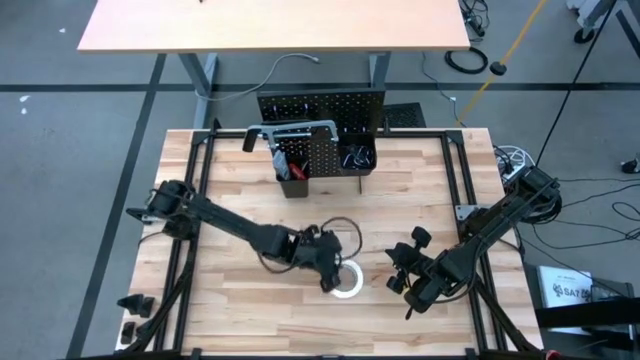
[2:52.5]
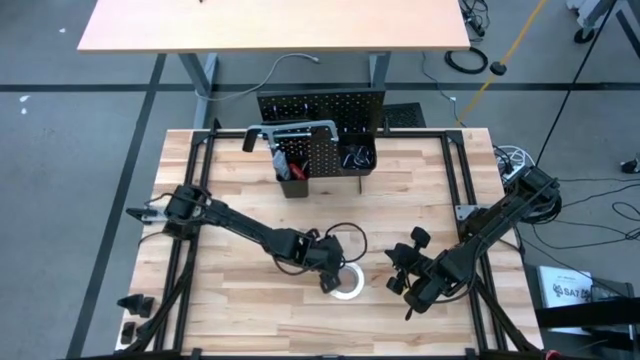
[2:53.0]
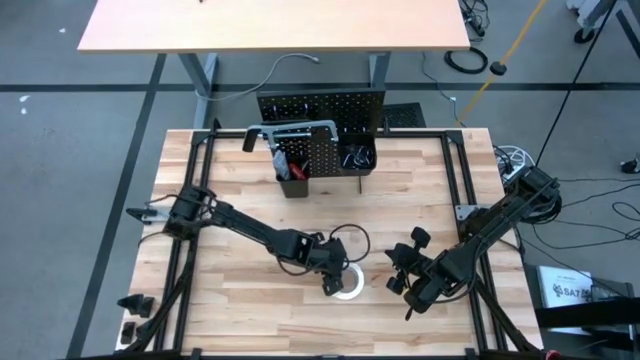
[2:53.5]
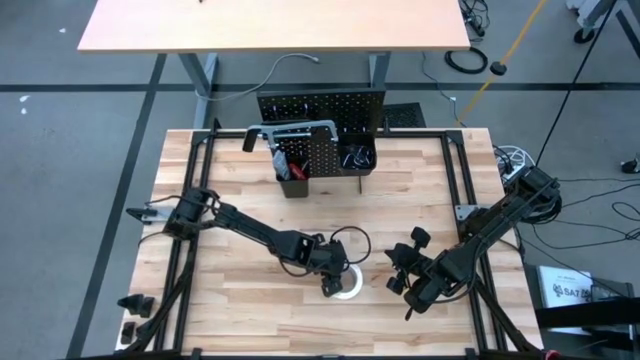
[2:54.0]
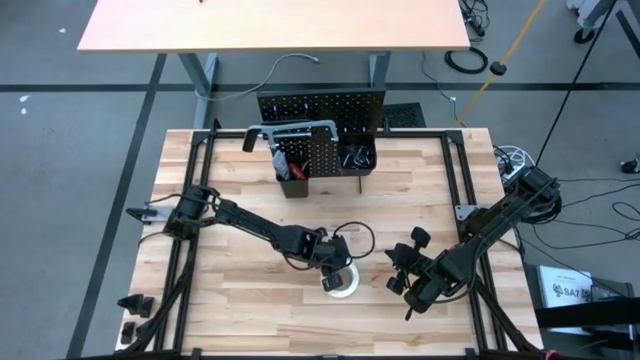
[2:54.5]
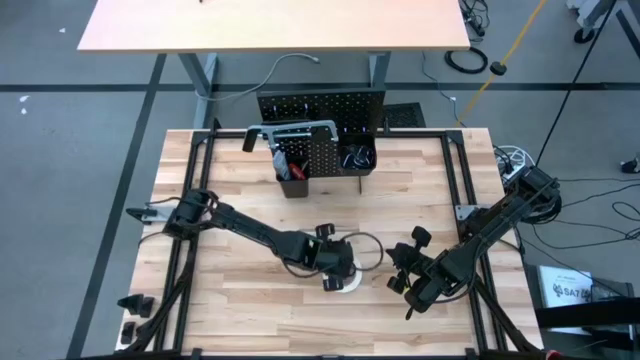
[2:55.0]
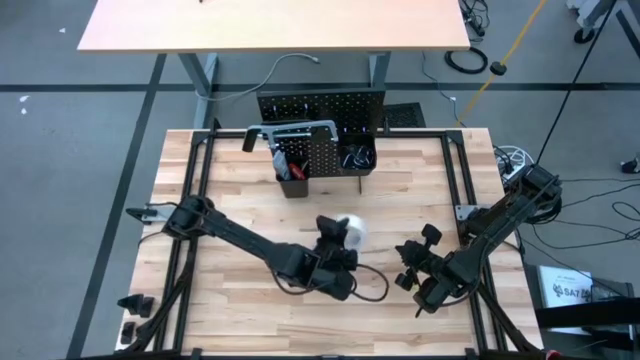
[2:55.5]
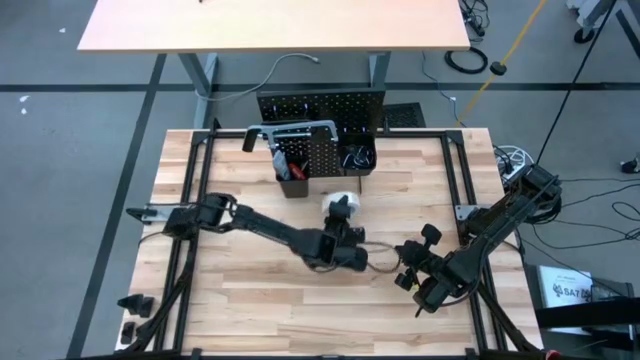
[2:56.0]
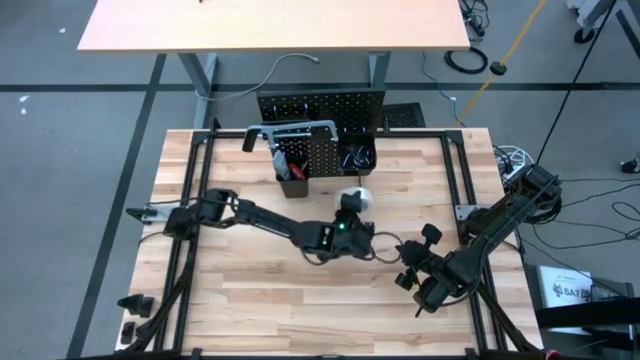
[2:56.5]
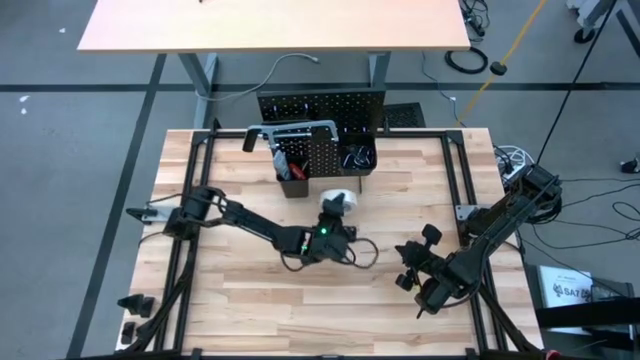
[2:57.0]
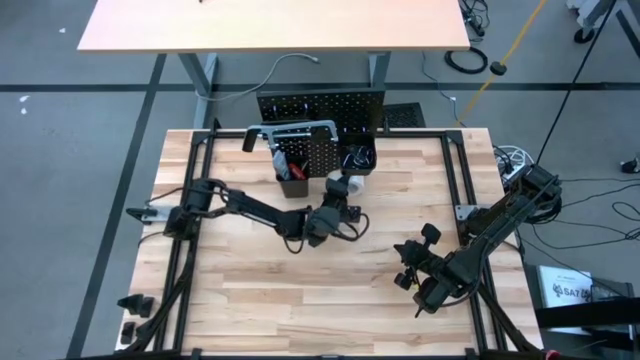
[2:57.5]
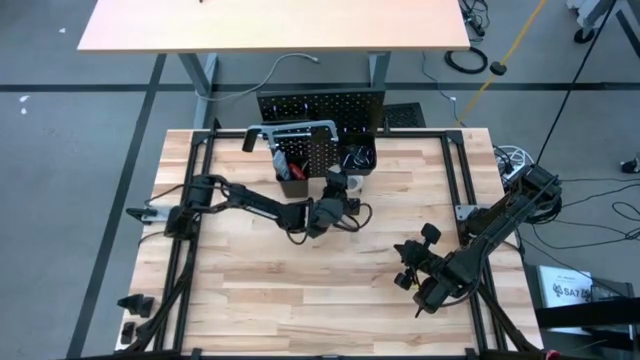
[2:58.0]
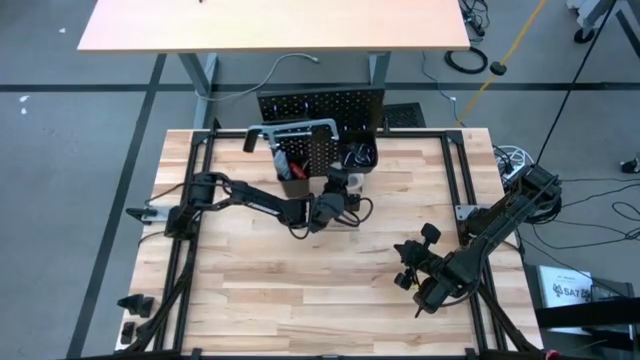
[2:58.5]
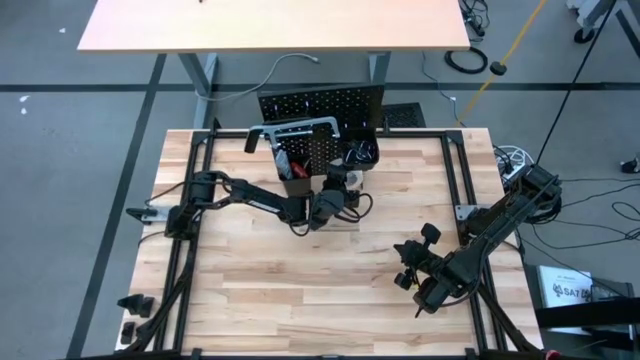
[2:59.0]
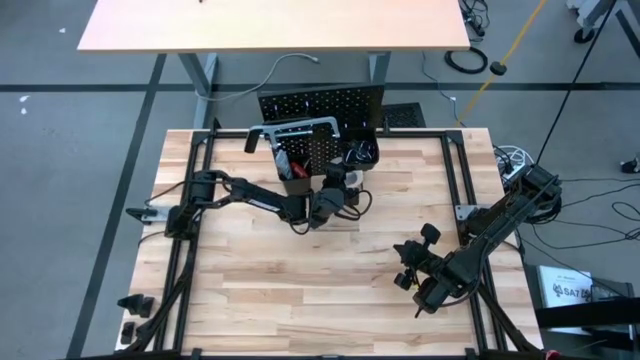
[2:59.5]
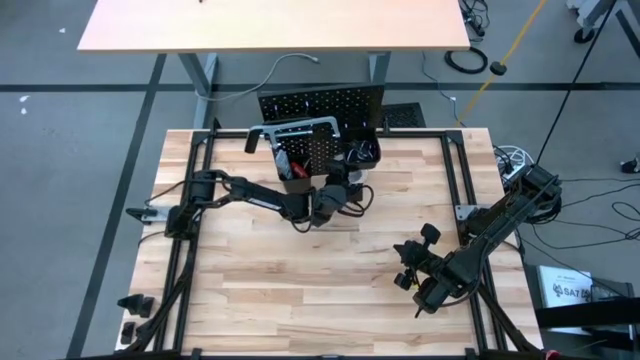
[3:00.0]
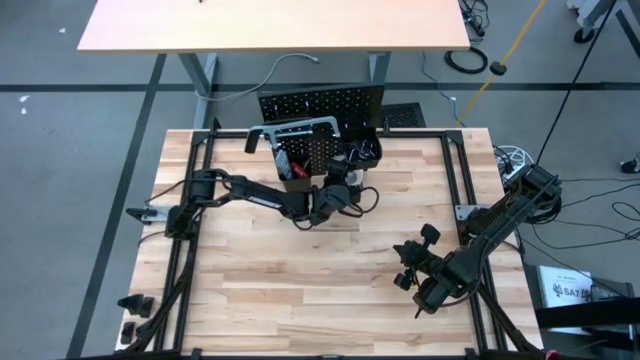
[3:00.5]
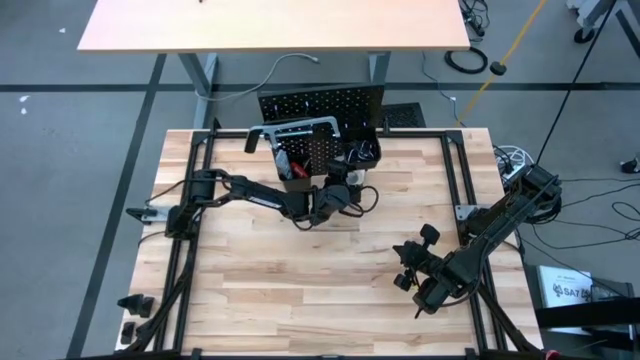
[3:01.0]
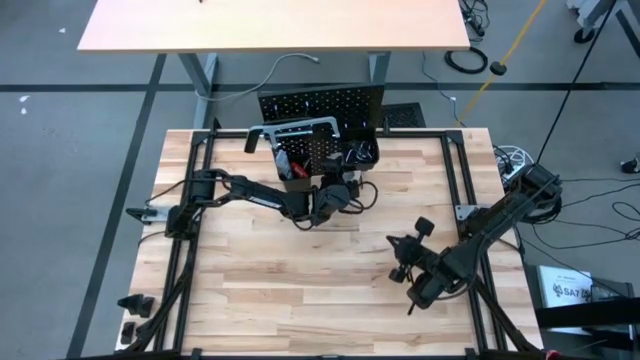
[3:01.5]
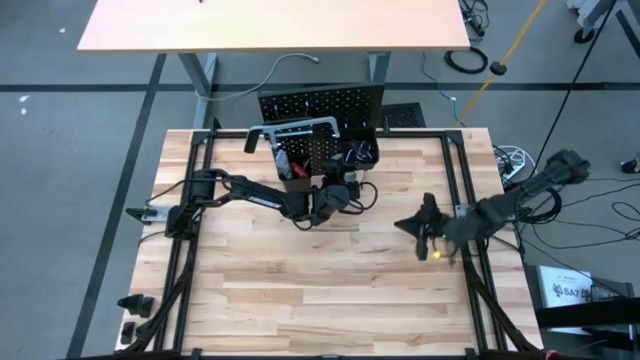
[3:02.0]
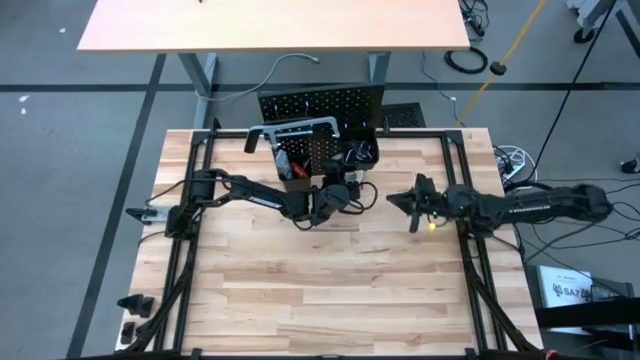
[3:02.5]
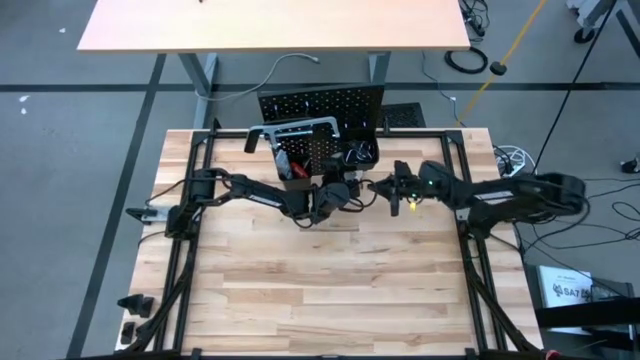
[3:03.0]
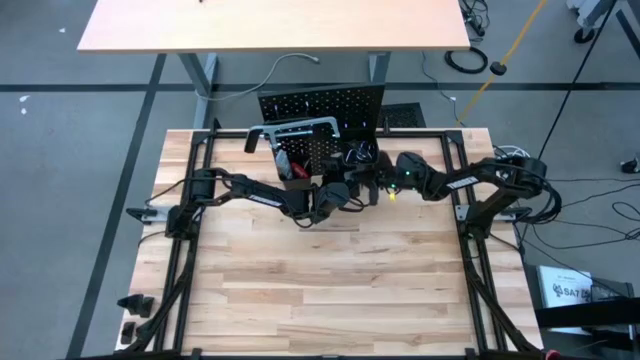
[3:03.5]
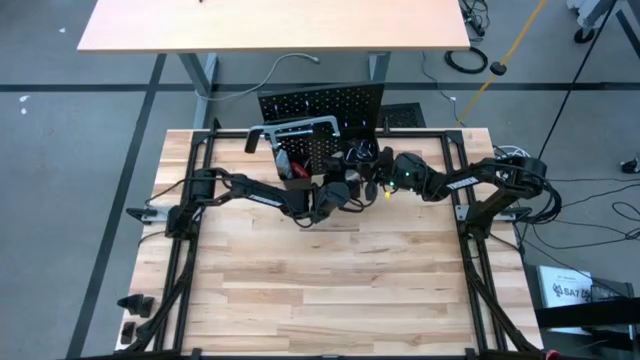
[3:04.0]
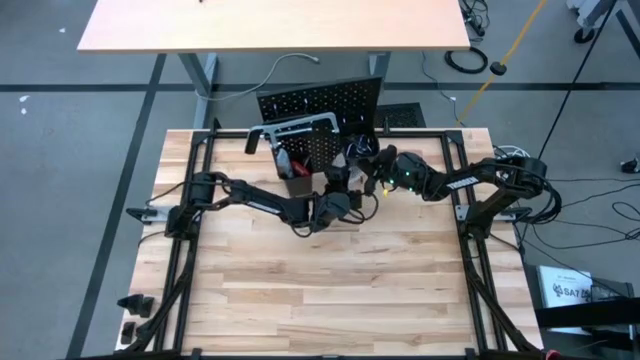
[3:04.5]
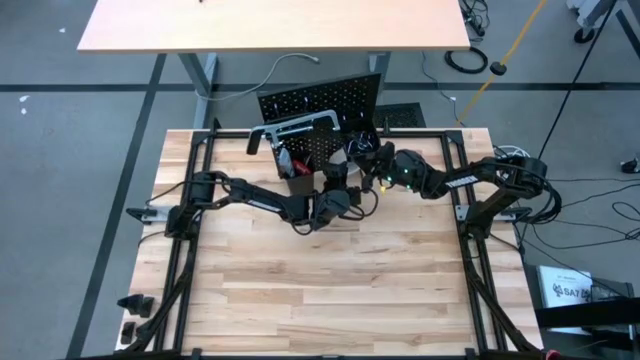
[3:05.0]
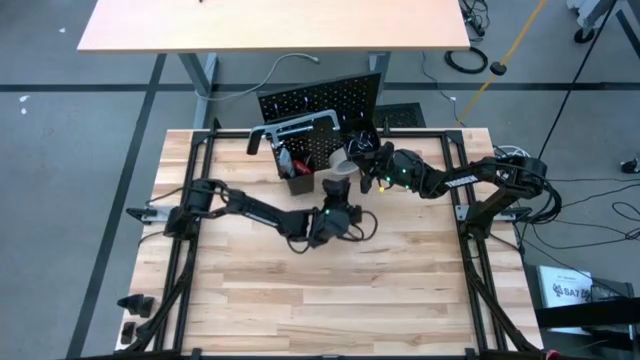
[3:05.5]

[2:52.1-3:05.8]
Task: Hang tools onto peg board
Hang the white tape on the peg board

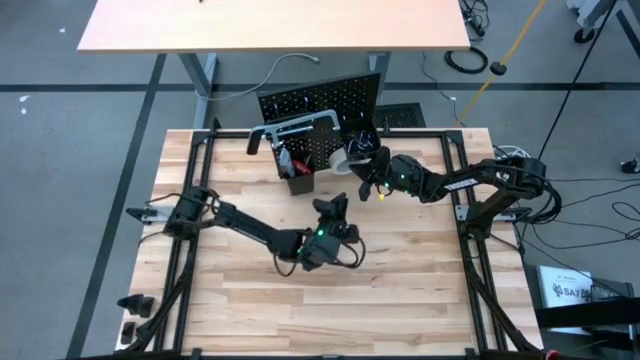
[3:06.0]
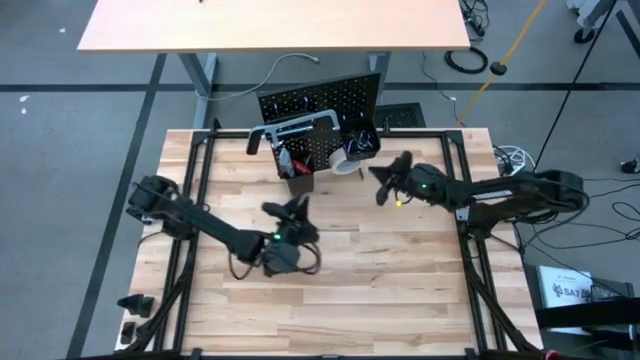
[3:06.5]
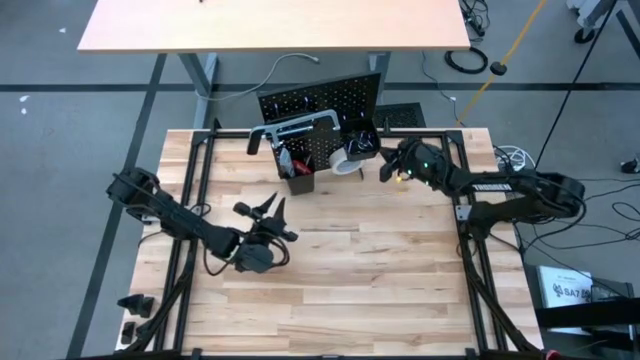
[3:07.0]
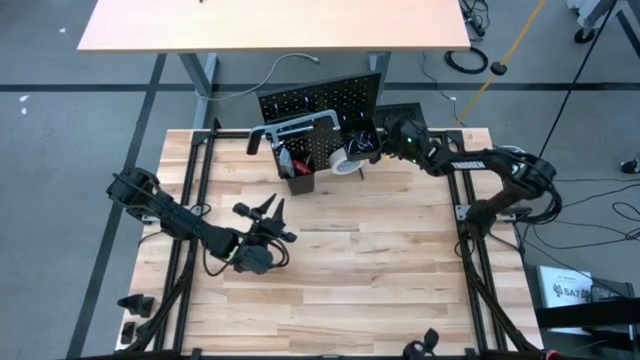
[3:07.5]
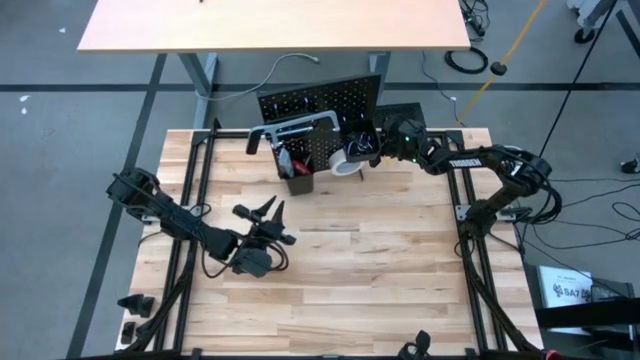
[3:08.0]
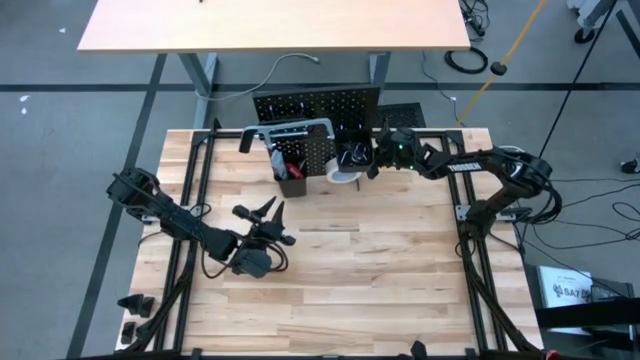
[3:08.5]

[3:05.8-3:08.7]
Adjust the peg board

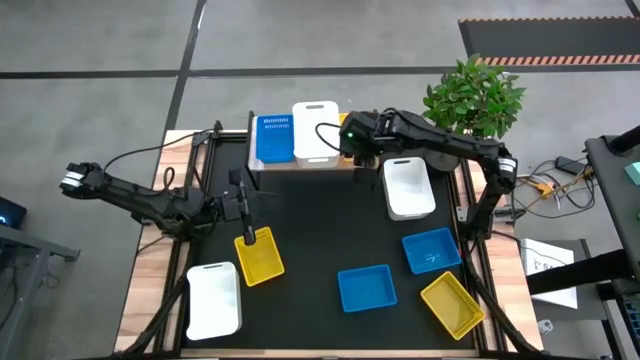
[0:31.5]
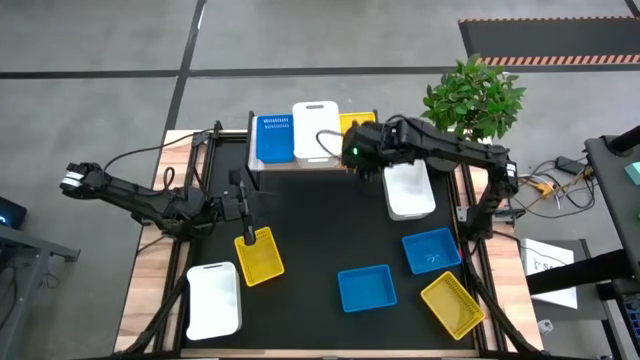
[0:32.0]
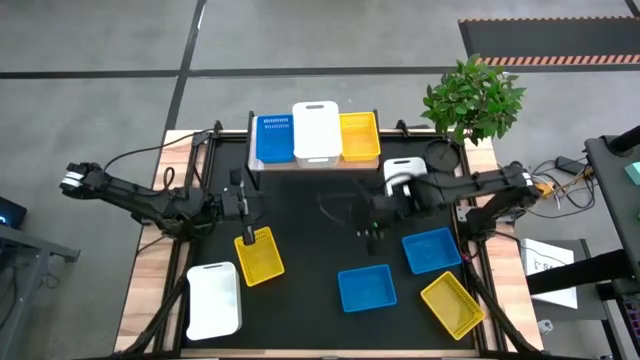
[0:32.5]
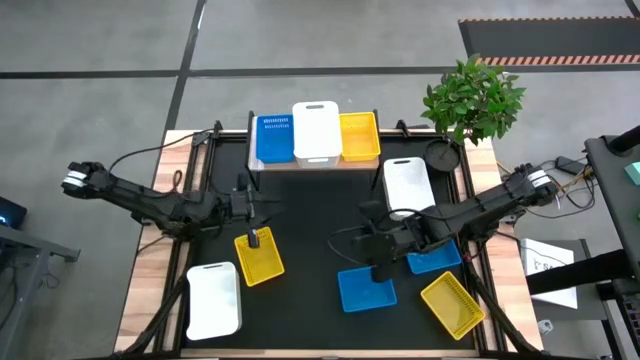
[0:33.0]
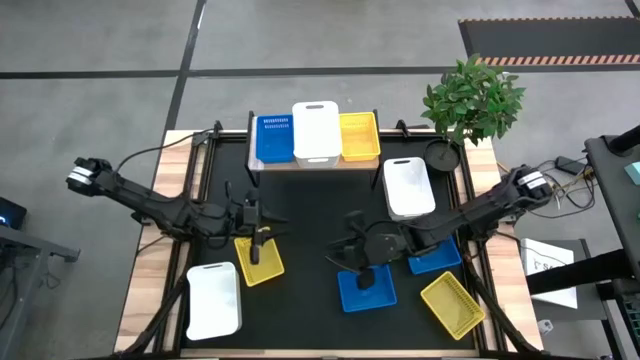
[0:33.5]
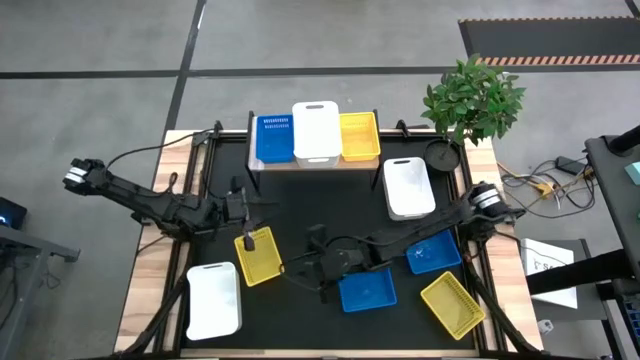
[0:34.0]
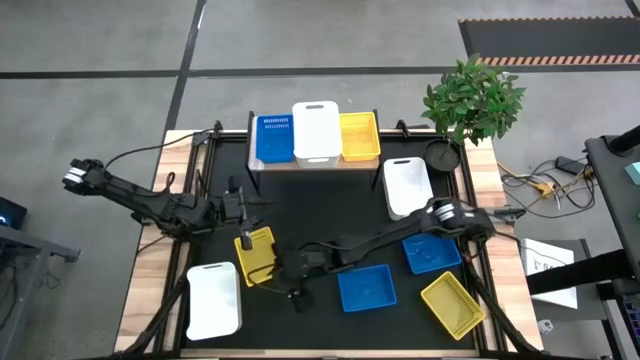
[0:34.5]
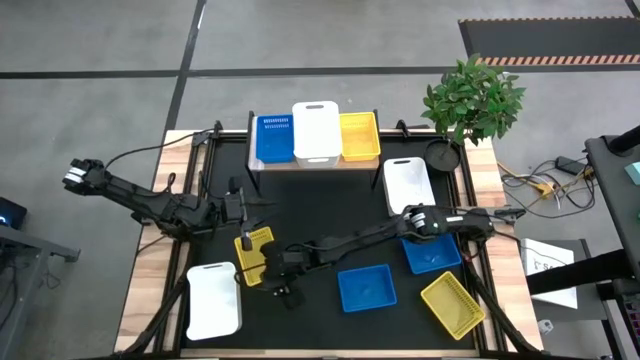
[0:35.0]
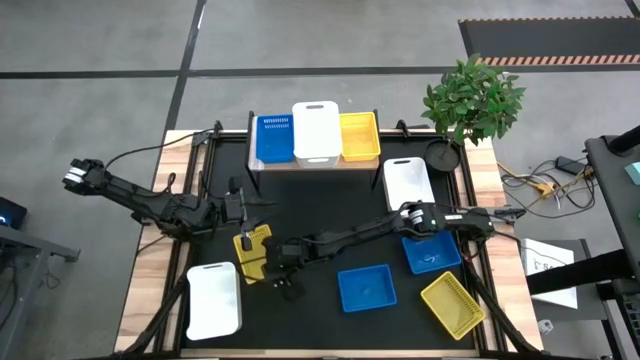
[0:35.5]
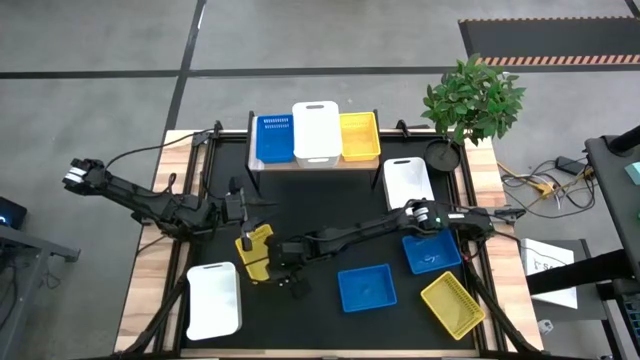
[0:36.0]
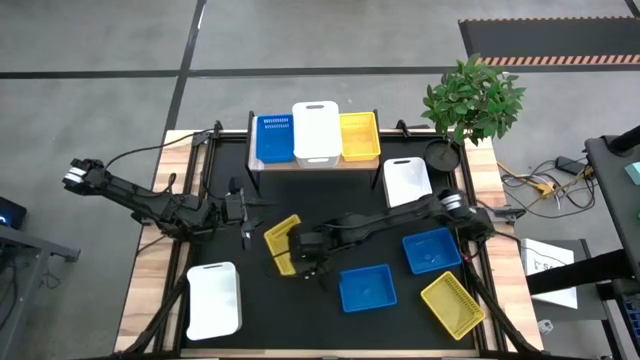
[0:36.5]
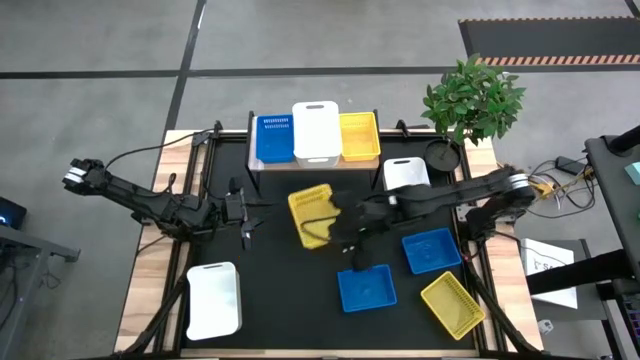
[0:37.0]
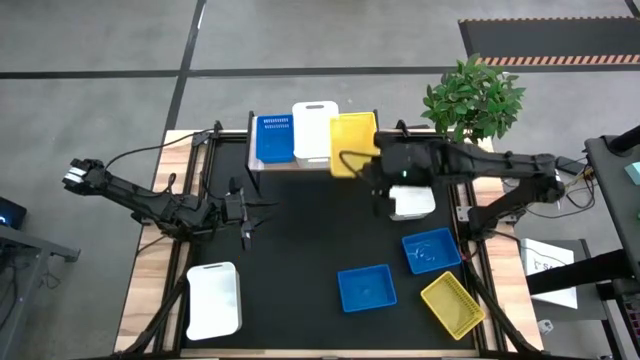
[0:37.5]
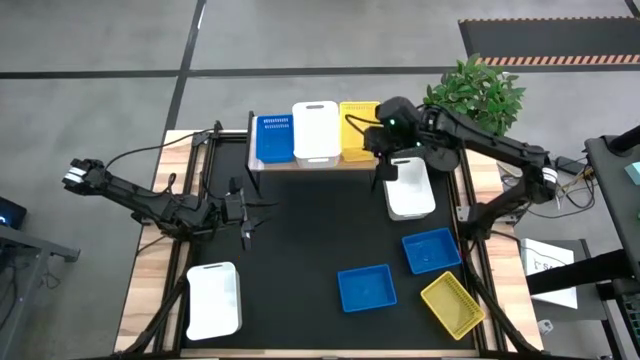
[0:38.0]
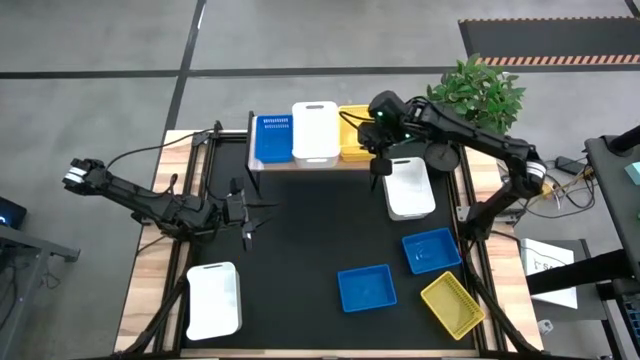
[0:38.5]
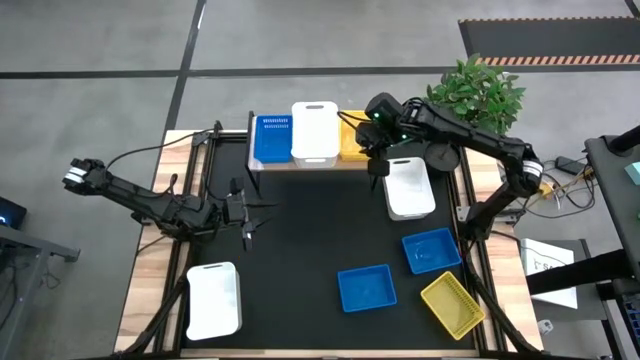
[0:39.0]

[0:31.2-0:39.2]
Task: Stack baskets on shelf by color
Stack the left yellow bin on the yellow bin on the shelf
